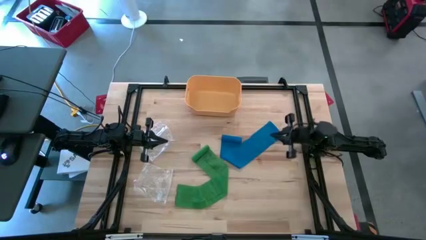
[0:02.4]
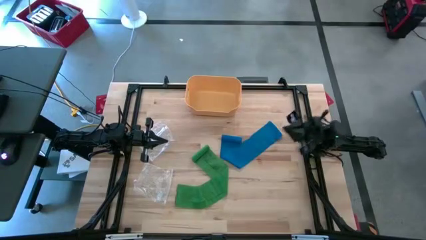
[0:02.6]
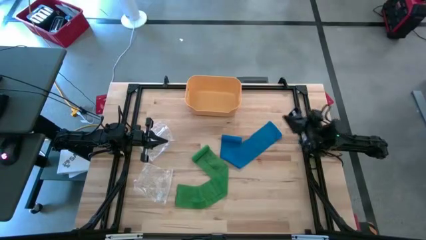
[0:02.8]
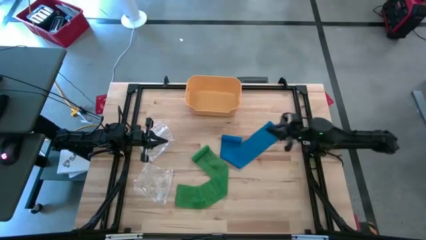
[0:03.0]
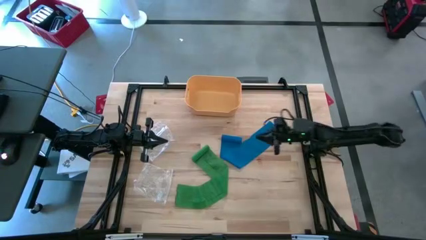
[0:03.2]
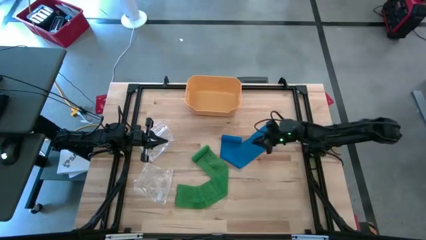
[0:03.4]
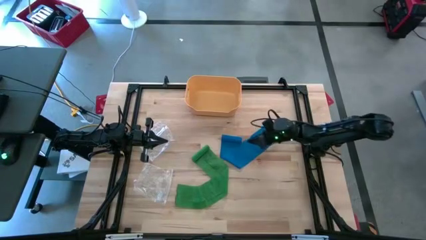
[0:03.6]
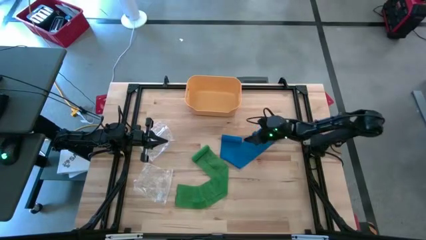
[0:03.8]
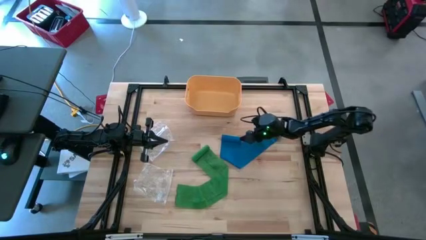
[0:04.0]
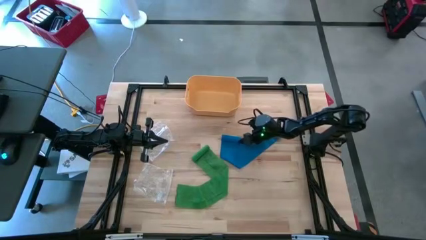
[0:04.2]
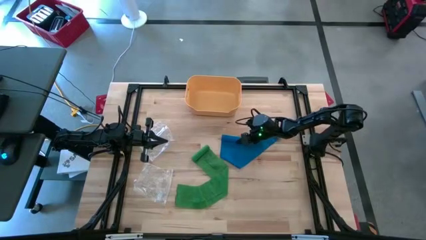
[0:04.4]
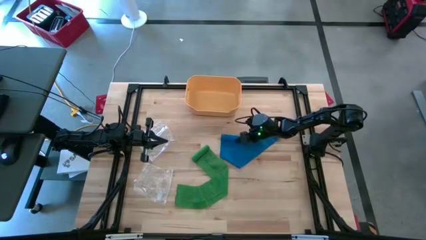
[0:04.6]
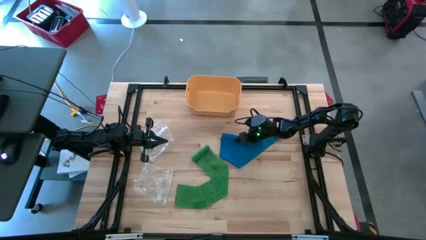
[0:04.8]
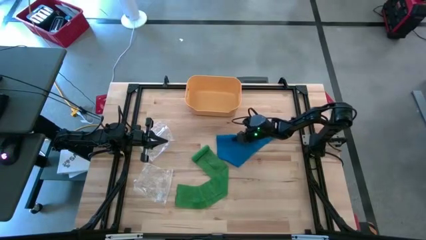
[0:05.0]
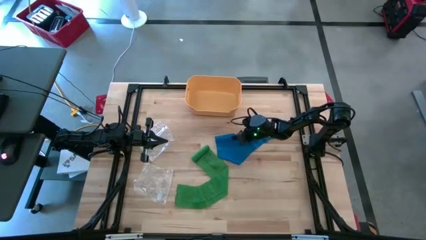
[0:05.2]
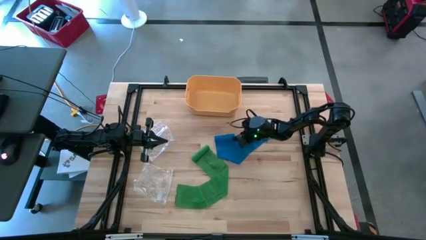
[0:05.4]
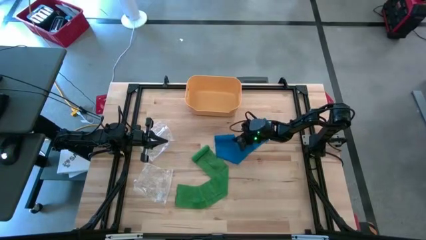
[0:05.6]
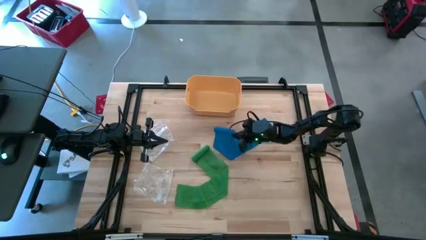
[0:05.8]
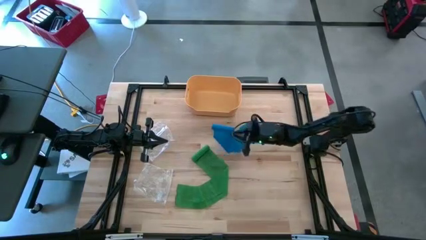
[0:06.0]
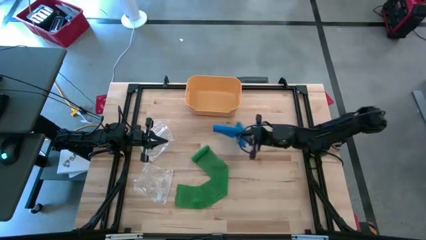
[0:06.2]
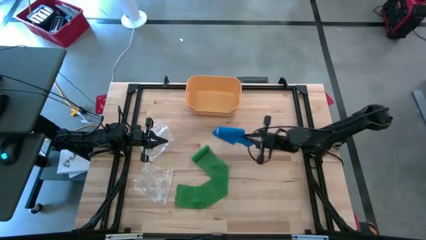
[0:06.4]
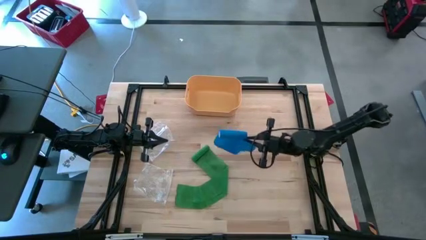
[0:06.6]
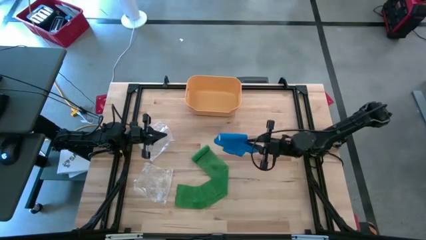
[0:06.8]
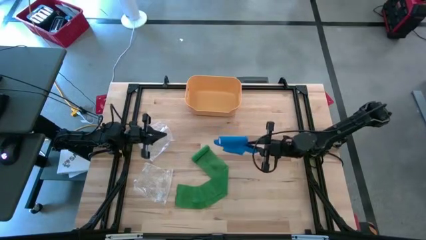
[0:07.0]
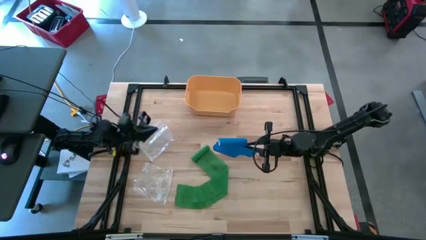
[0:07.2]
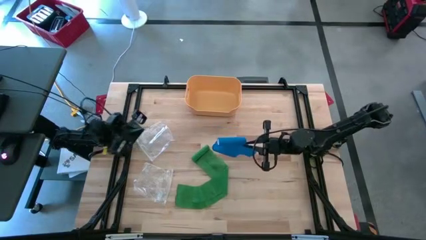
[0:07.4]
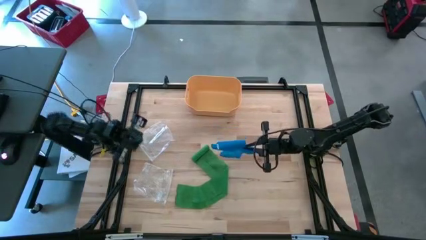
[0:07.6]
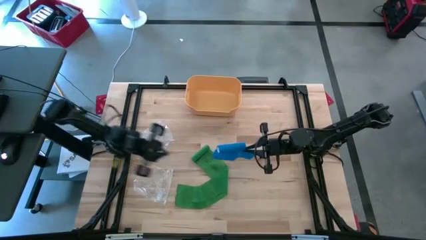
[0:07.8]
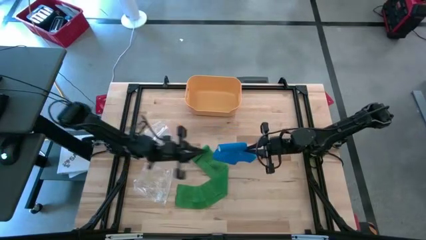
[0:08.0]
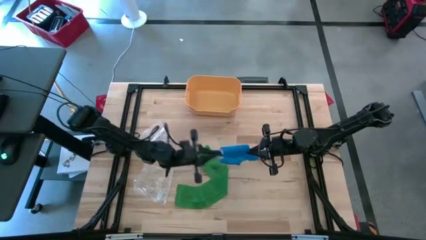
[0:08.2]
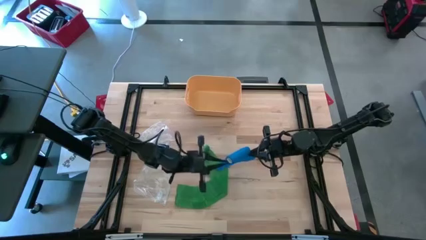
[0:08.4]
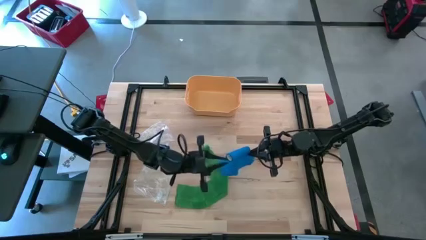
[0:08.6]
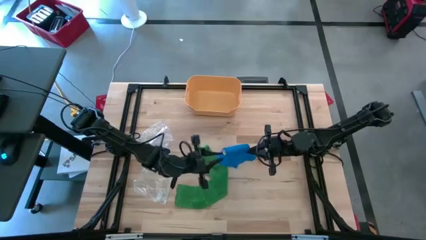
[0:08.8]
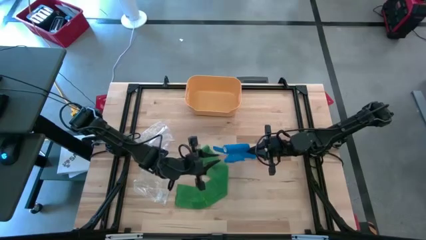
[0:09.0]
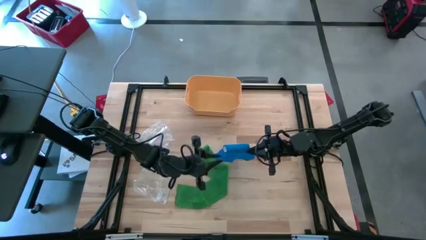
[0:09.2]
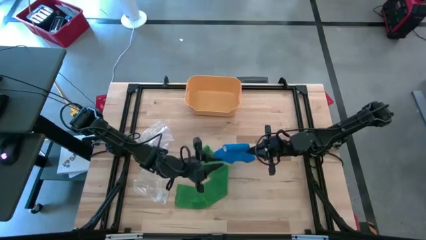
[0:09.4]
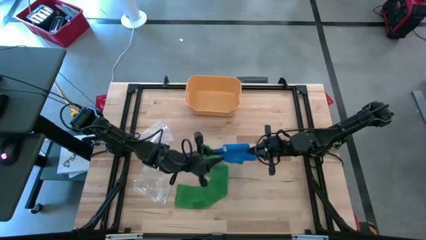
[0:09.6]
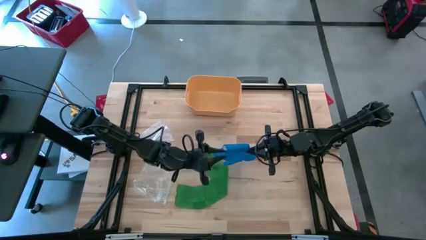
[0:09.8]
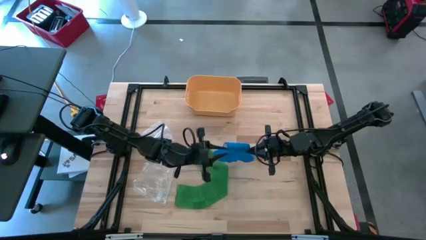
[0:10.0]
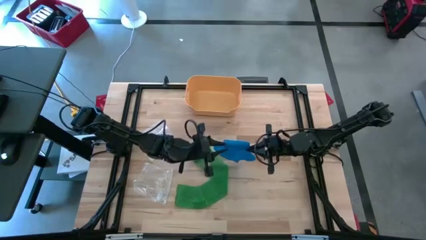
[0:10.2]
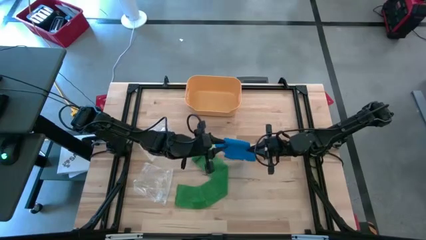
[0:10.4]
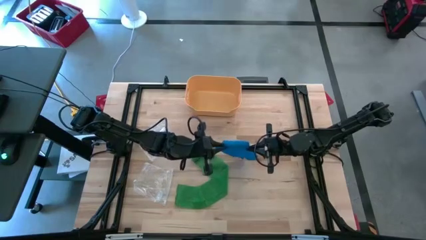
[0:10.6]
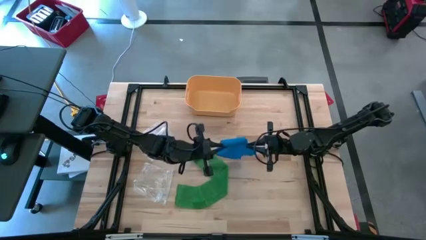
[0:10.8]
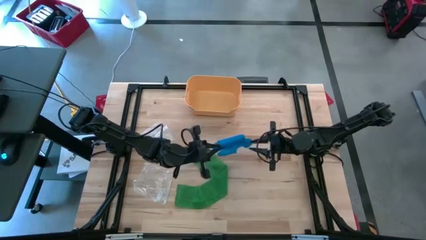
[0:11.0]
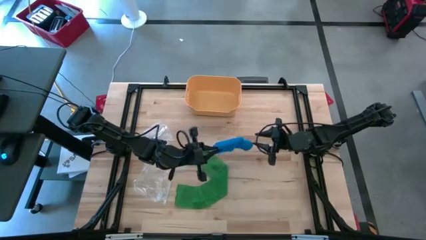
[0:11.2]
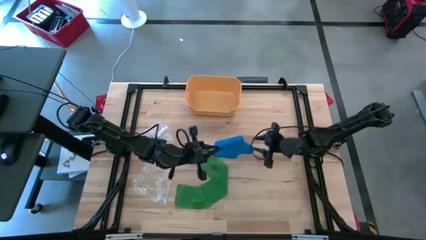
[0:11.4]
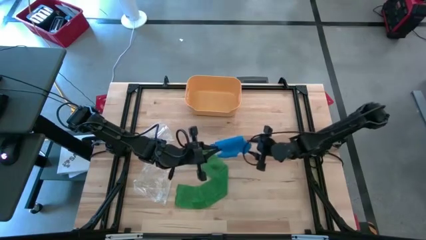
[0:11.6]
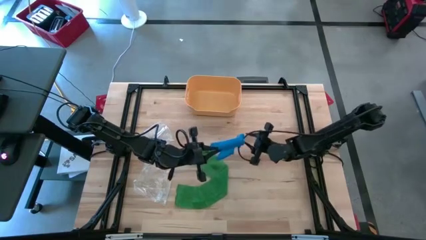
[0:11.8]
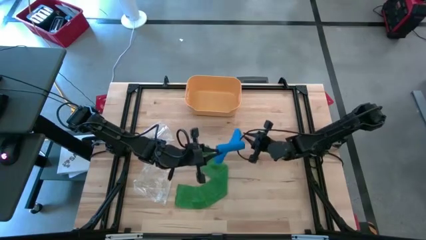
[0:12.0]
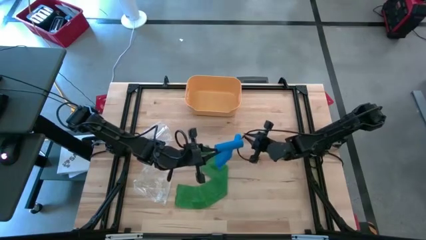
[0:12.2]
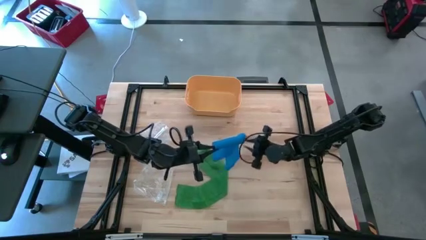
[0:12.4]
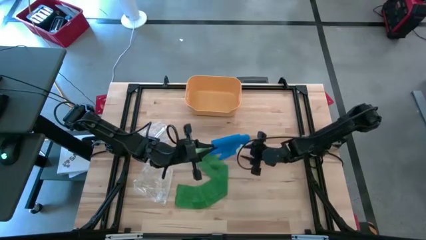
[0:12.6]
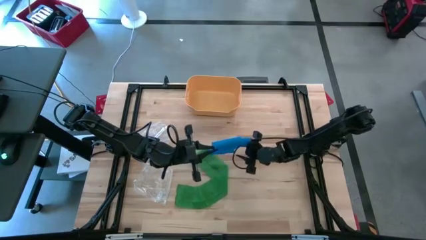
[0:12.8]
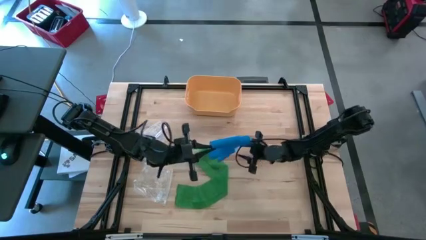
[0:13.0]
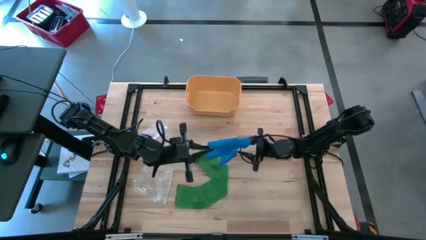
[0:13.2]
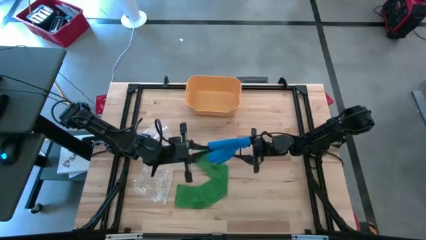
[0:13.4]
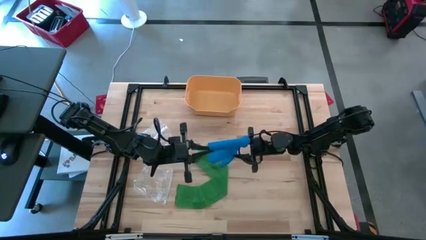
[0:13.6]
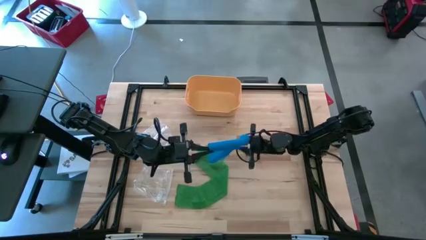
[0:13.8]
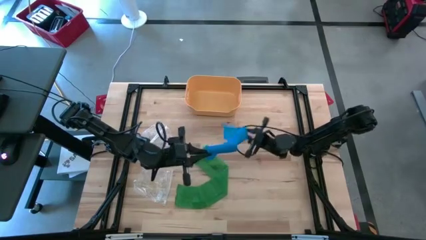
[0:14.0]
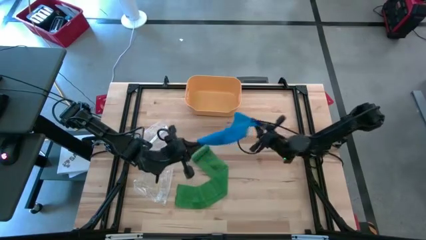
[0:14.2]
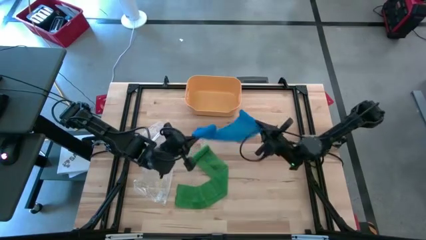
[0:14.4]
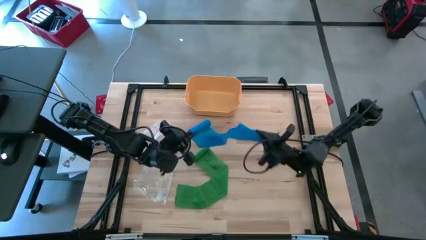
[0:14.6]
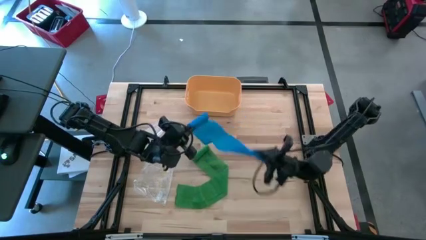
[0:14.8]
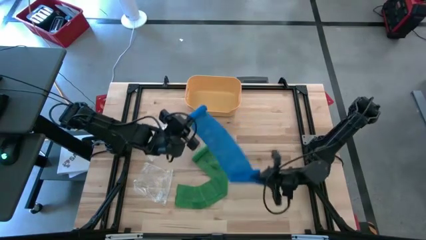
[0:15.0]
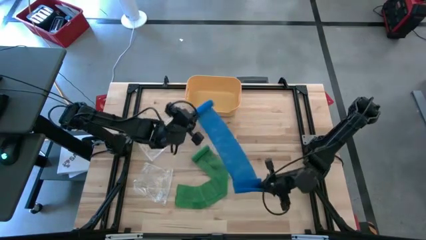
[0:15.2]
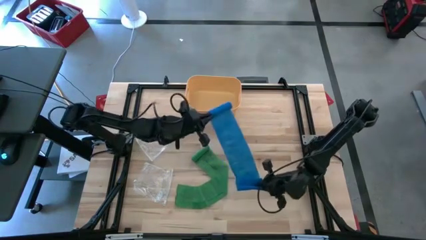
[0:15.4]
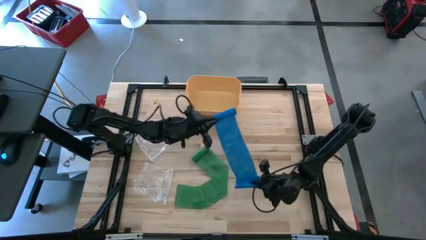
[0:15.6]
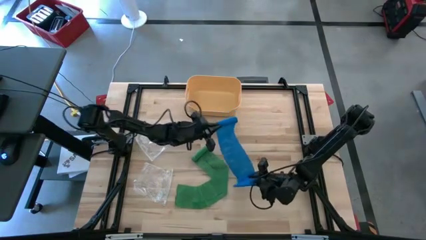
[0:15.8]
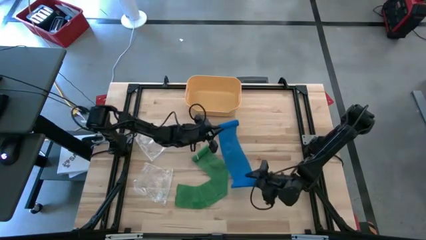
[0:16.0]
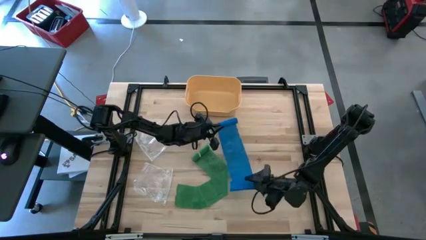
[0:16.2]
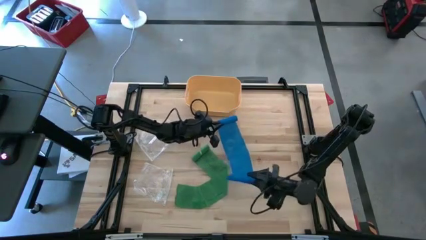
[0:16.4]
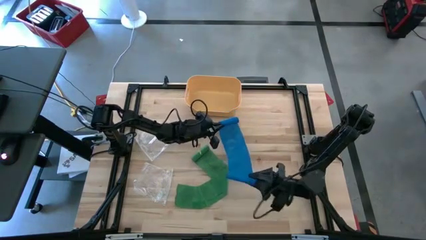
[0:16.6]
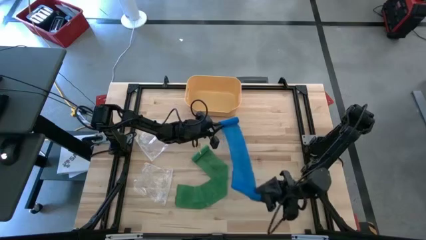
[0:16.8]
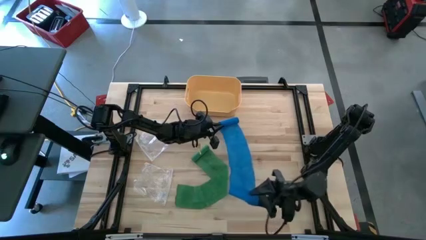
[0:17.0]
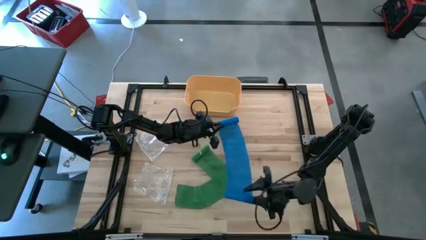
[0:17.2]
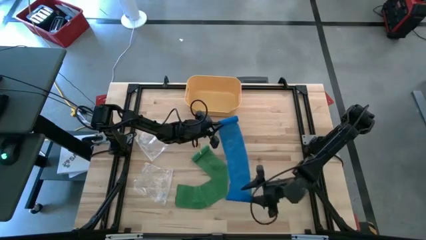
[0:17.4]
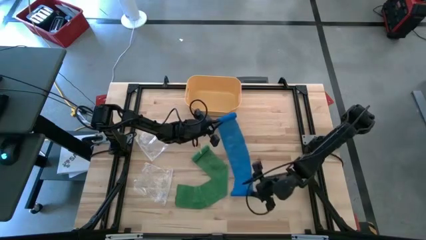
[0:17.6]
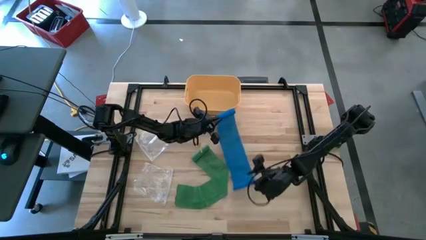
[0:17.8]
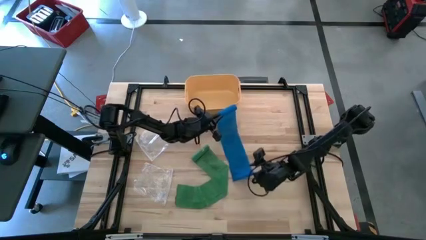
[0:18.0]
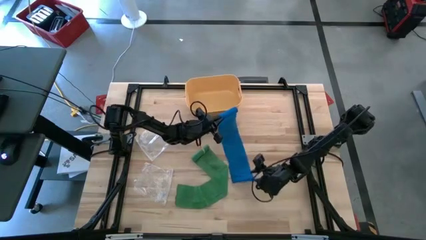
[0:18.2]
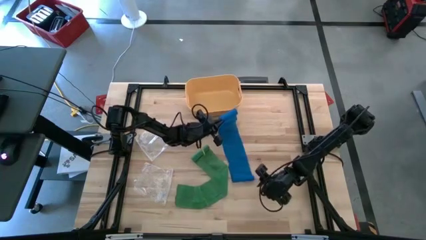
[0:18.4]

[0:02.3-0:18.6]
Task: Roll bandage
Roll the blue bandage
